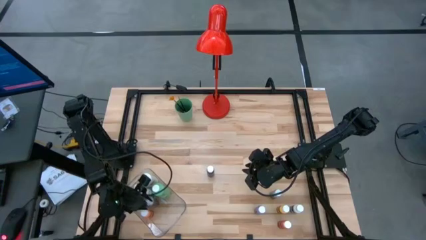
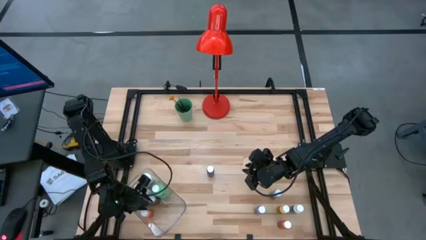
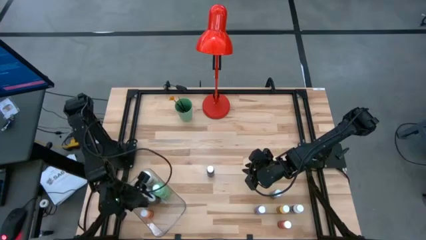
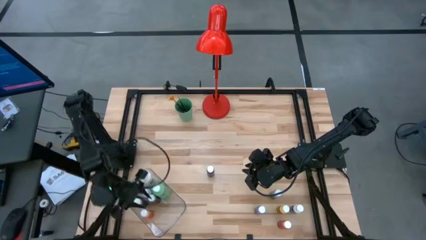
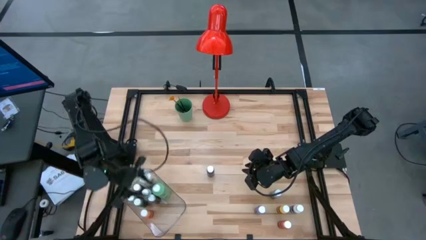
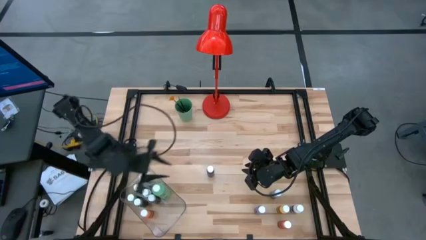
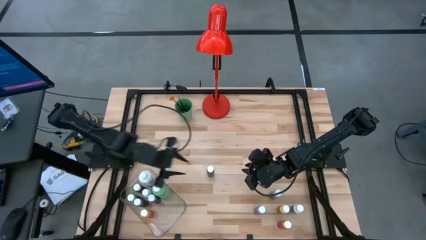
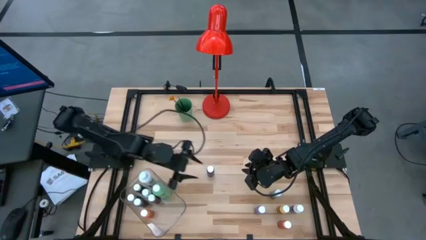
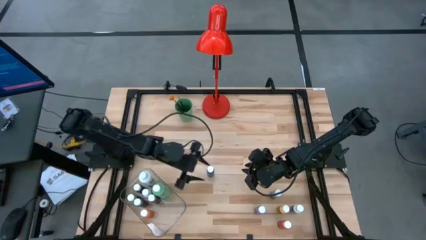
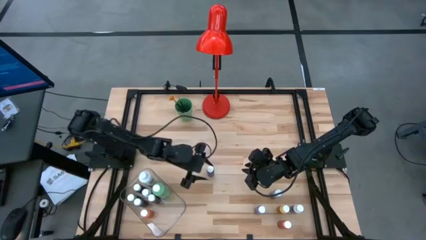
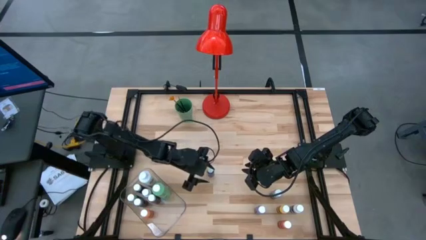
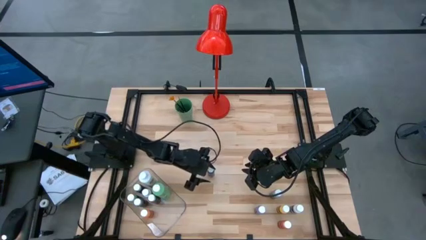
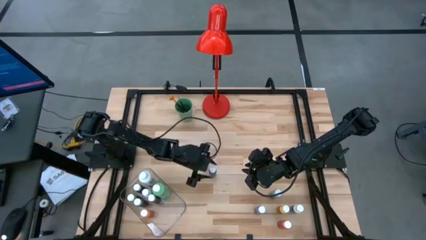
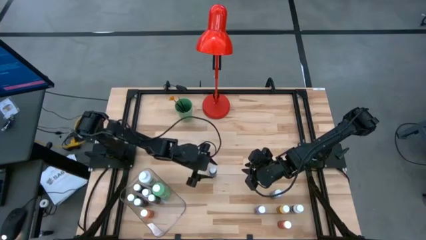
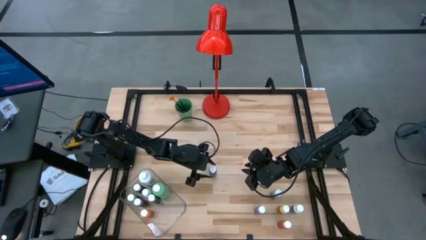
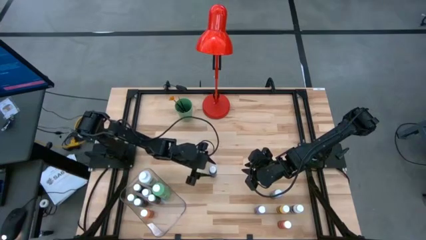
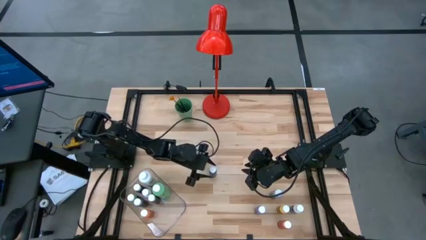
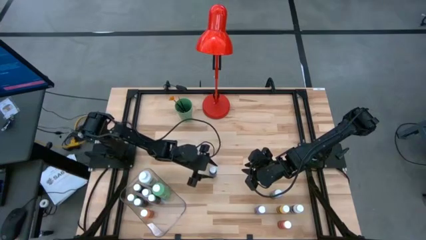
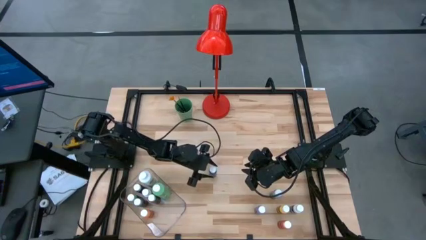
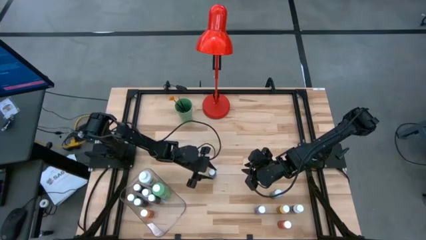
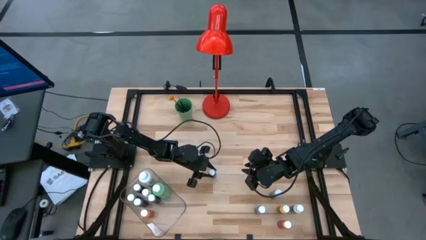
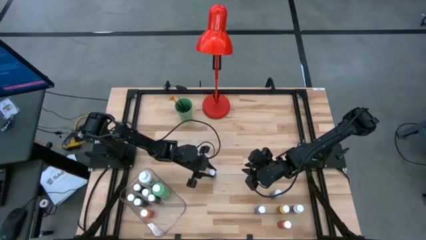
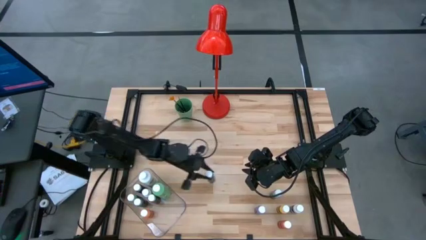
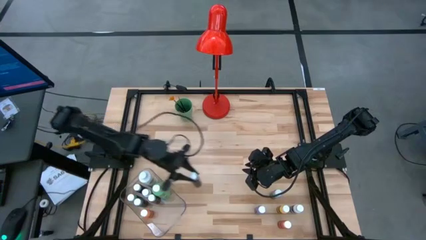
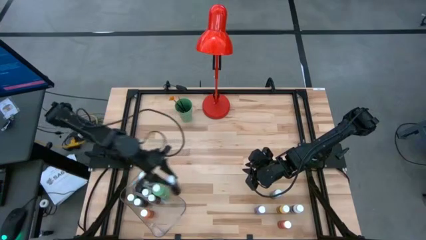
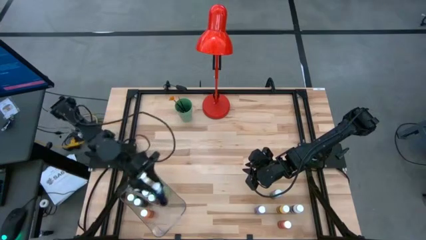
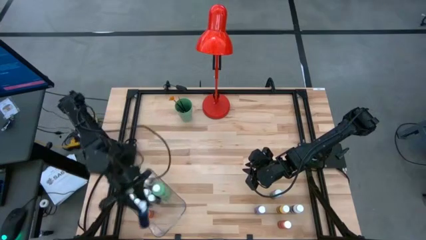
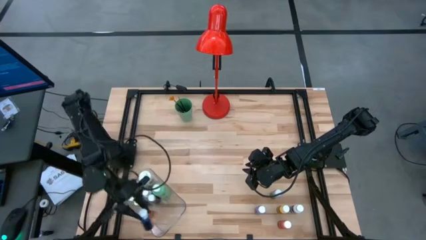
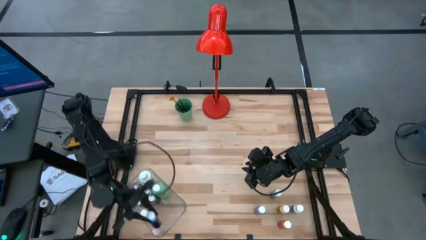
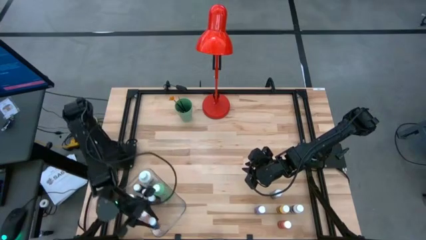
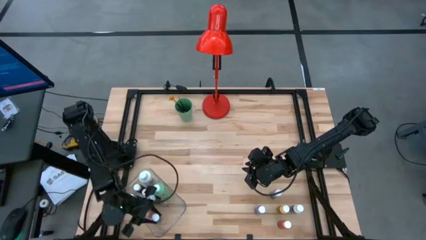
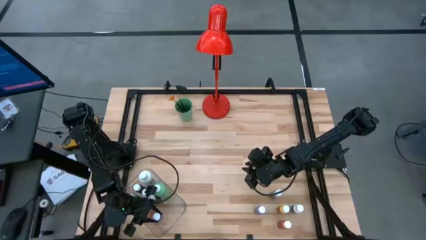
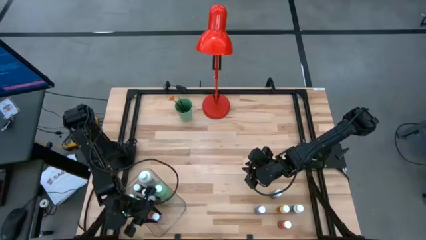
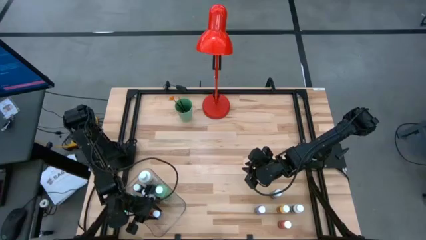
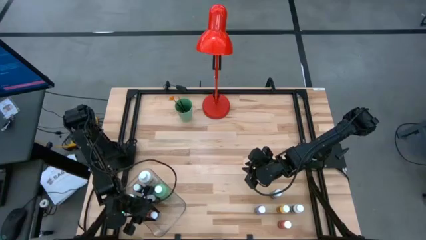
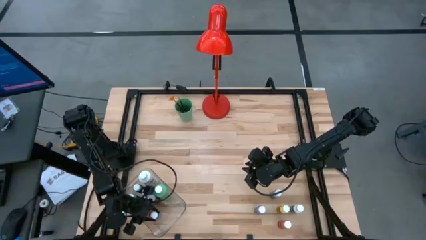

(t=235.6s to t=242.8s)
Task: Pick & Place Paint Supplies
Put the blue coloring bottle into the transparent bin

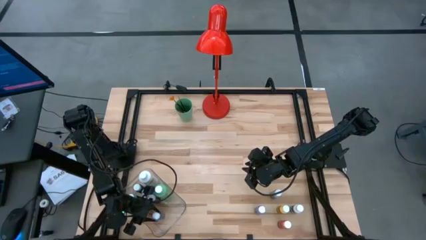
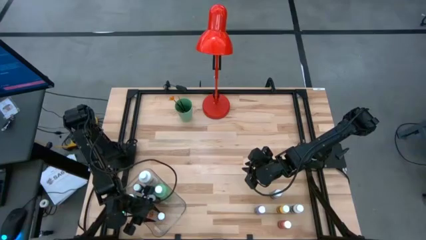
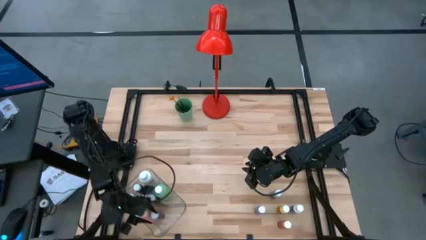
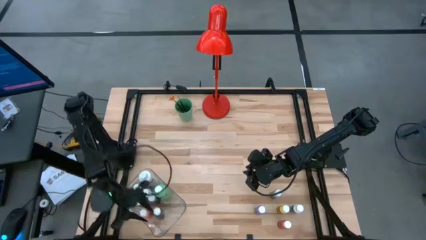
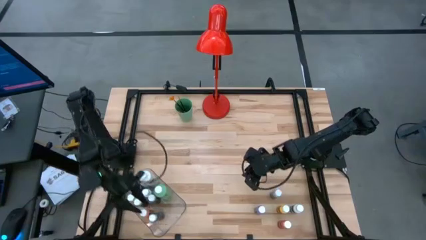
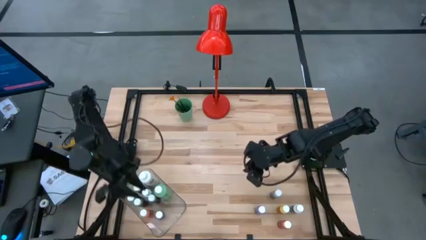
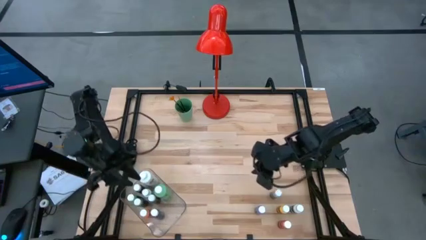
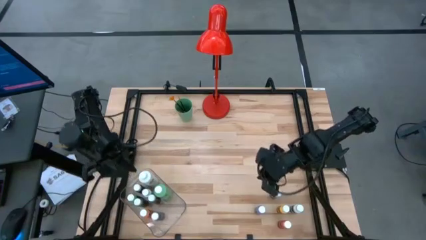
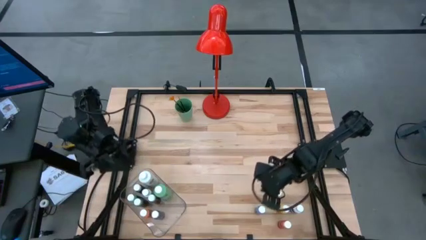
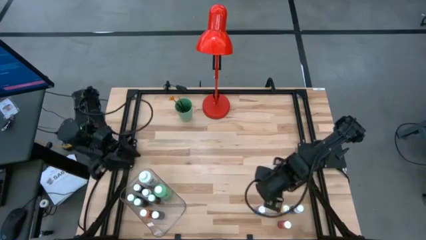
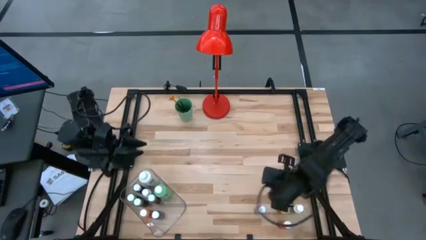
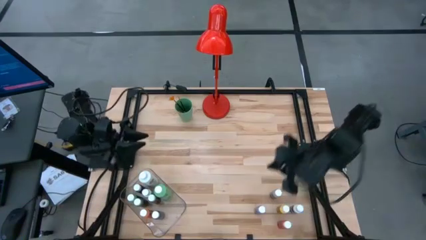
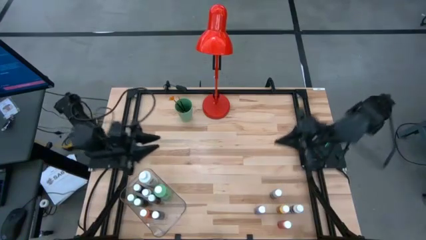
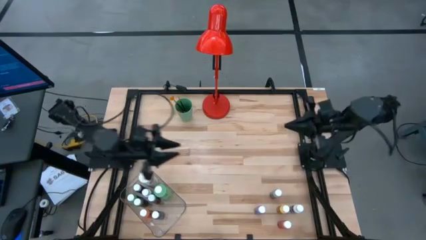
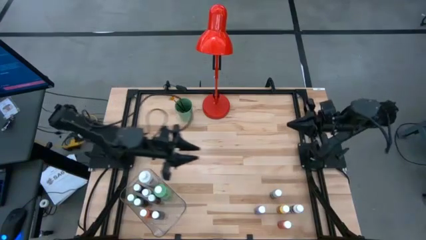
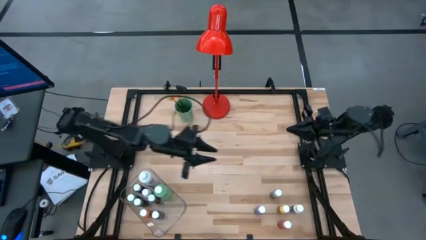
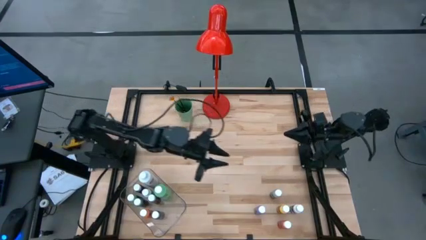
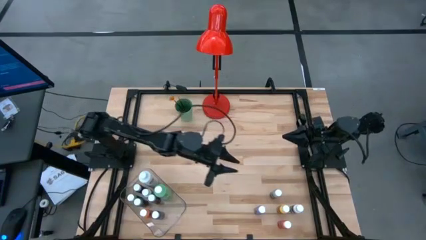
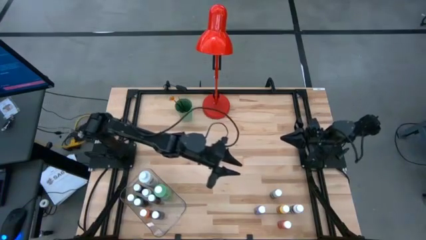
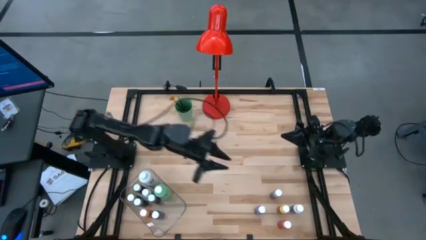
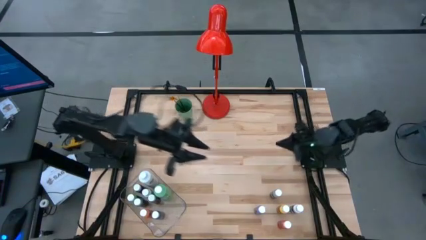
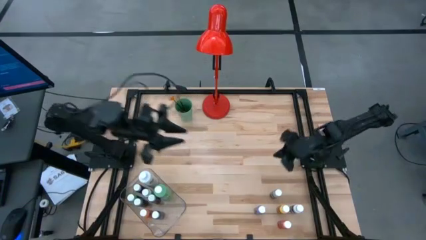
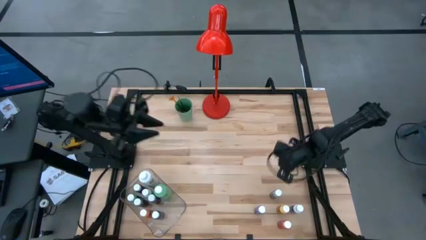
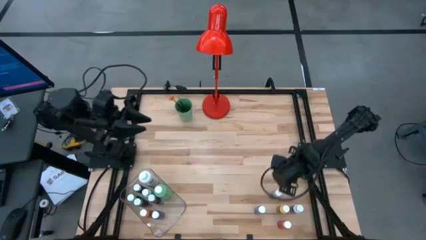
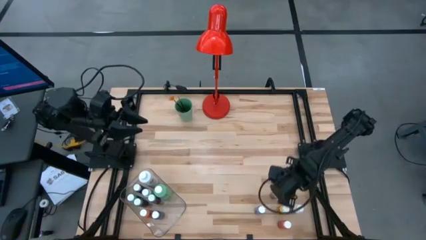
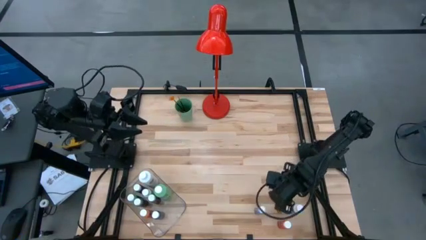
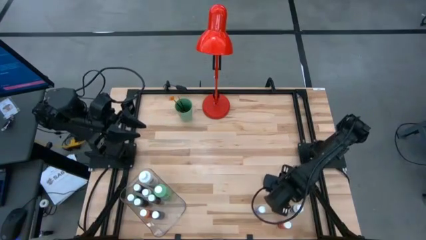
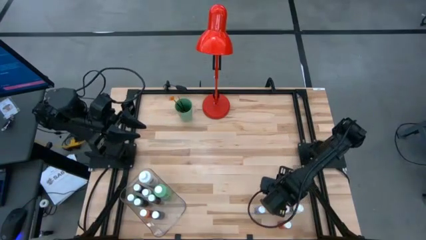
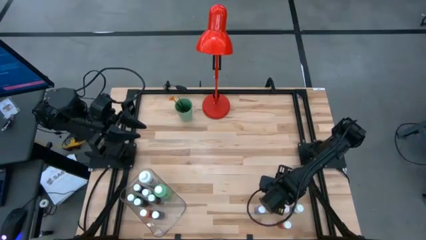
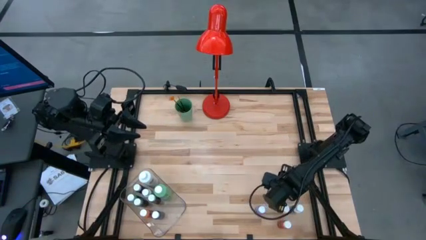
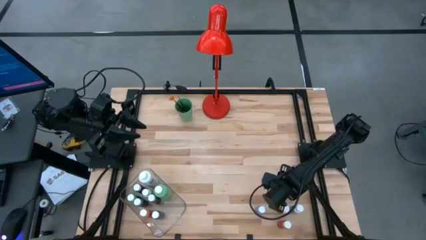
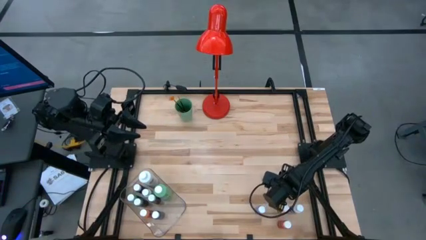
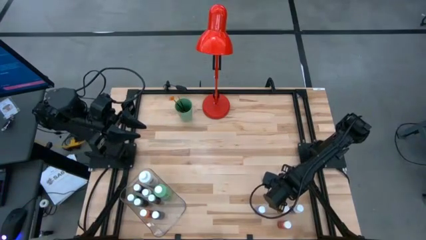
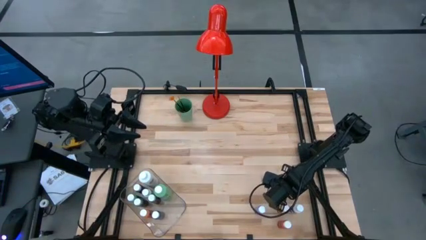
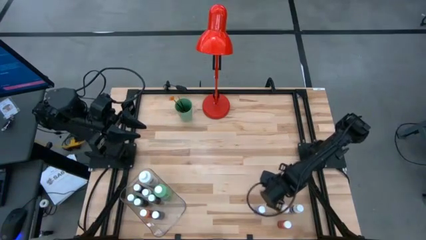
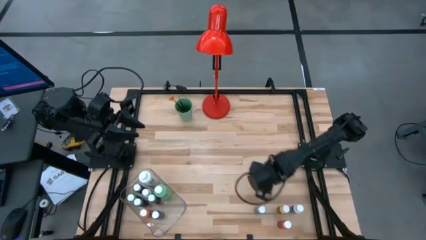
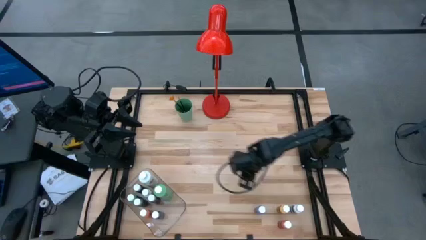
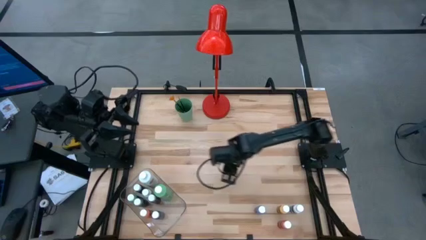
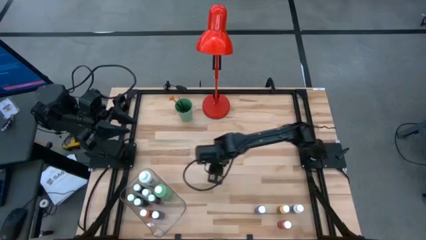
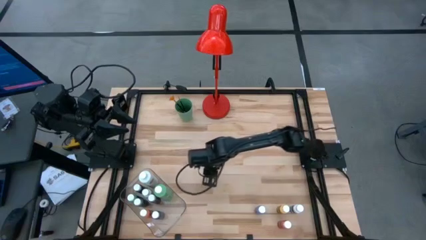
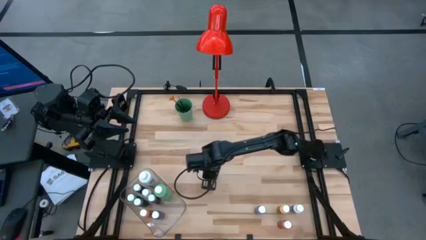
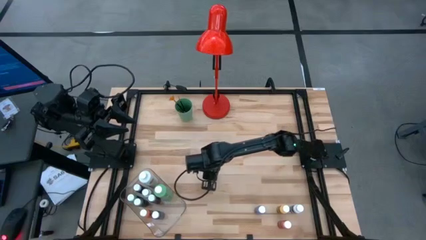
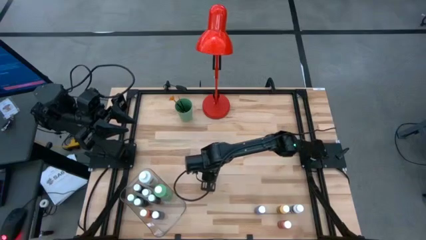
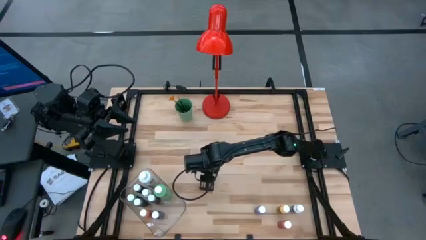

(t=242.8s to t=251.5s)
Move the gray coloring bottle to the center of the table
